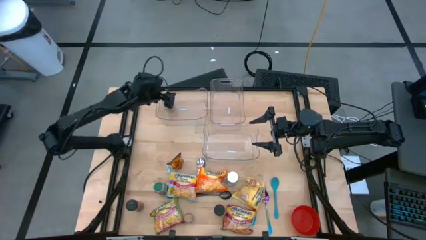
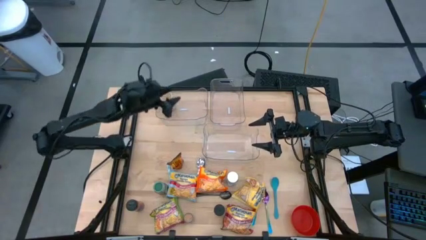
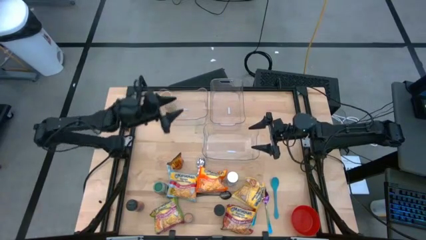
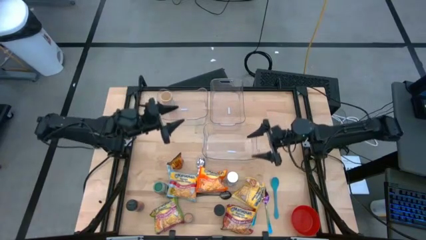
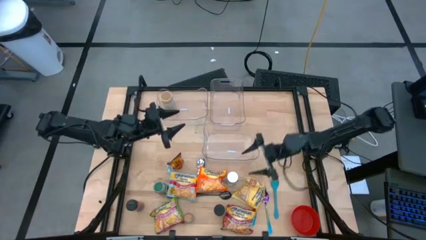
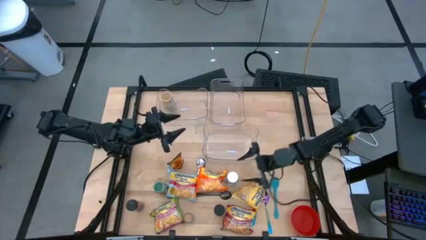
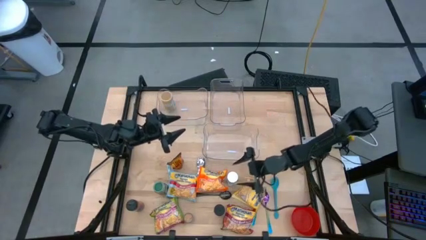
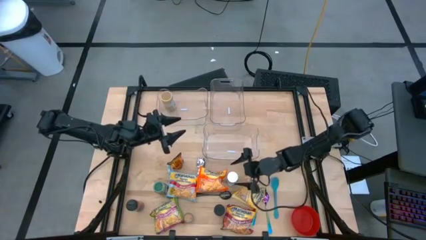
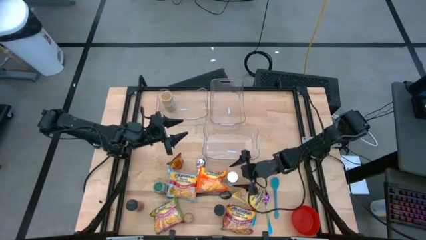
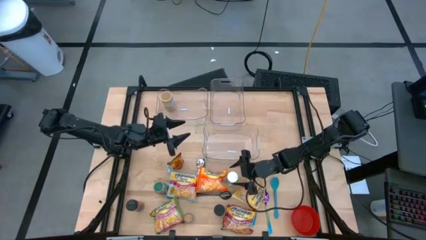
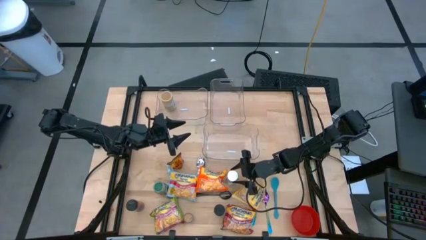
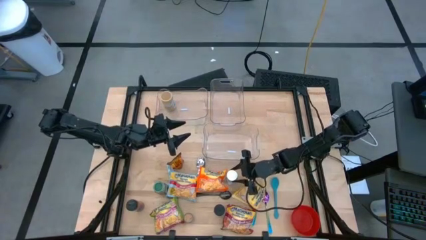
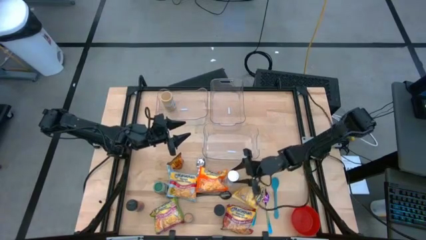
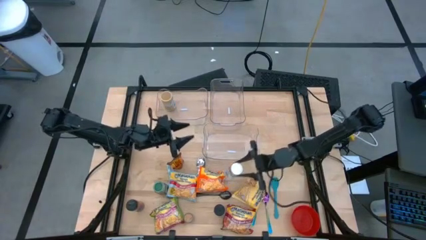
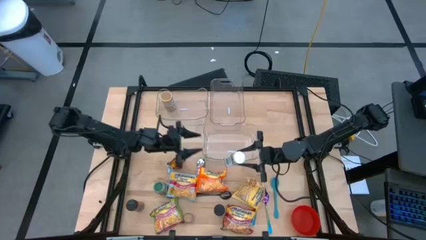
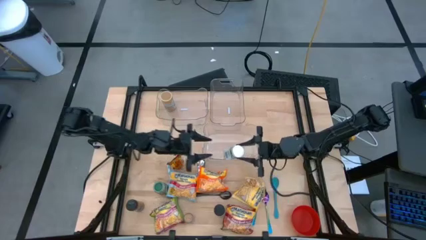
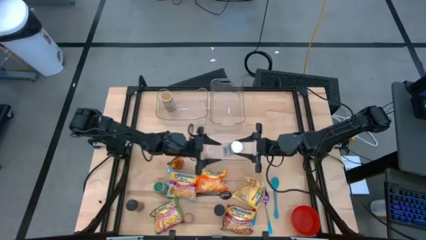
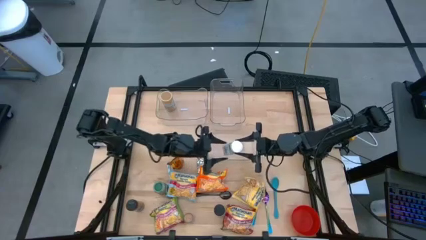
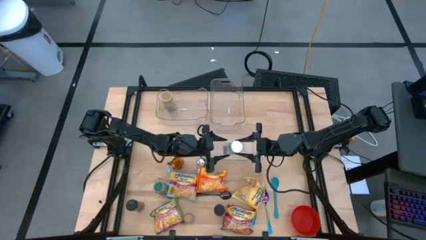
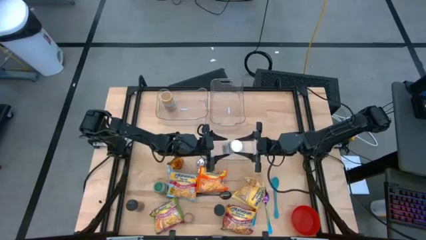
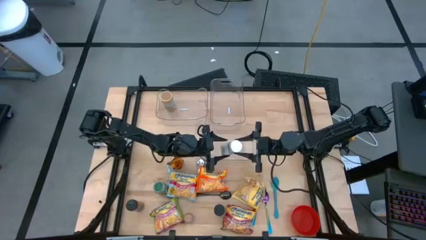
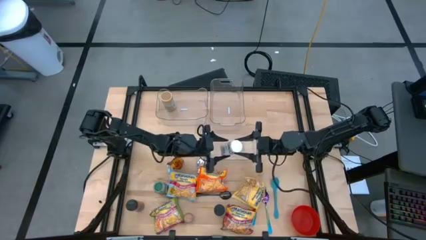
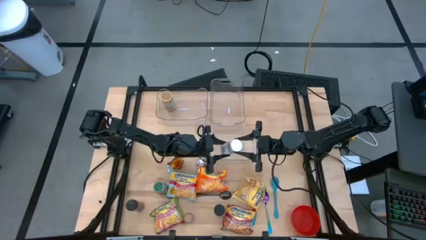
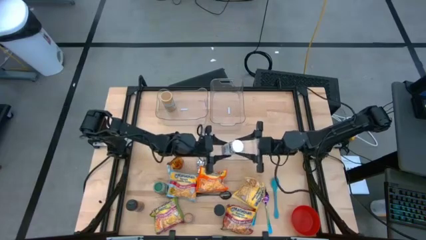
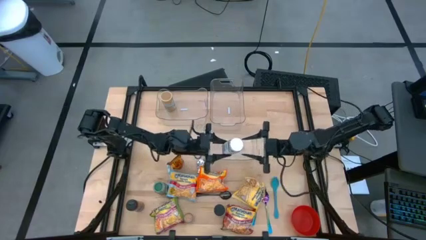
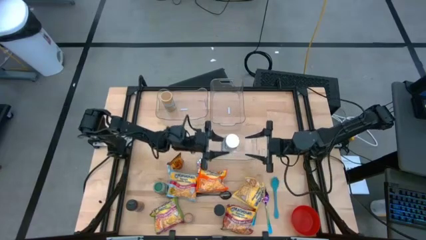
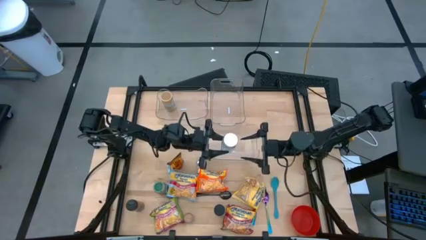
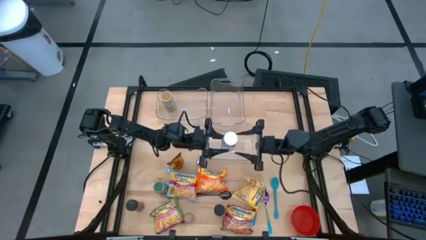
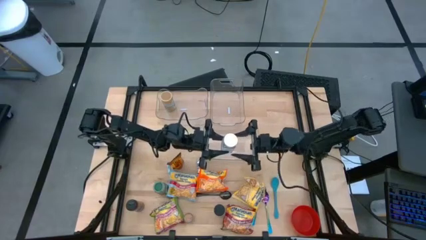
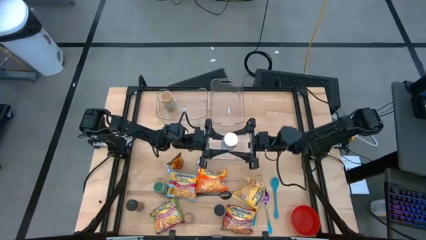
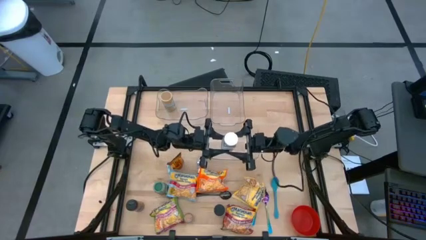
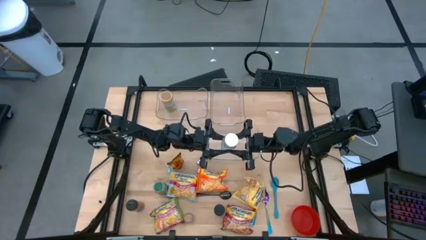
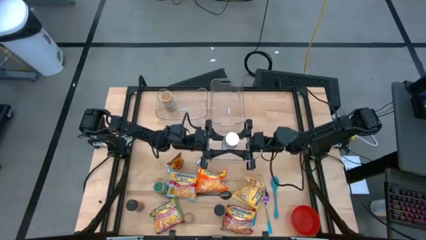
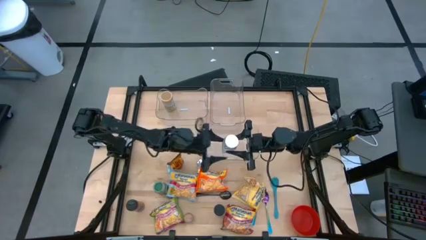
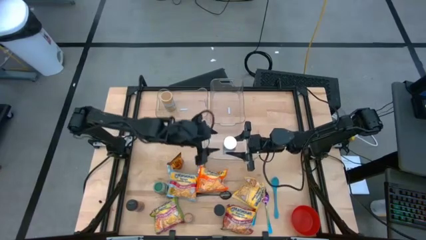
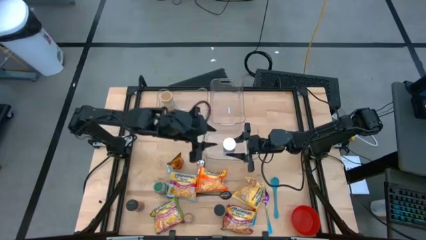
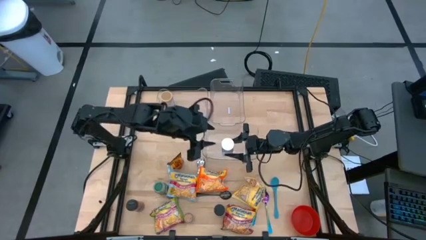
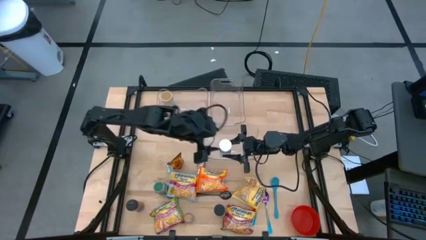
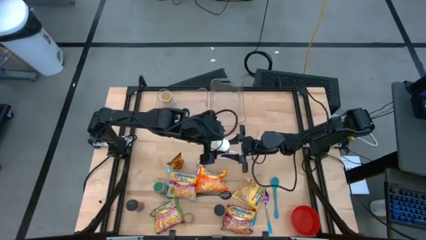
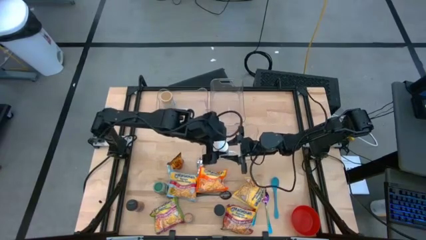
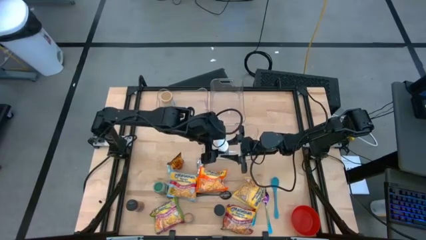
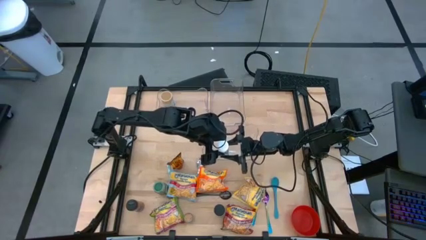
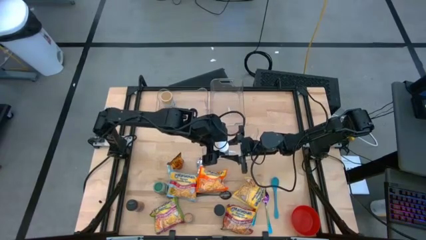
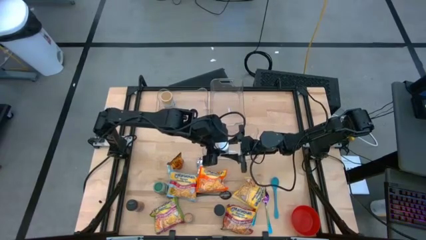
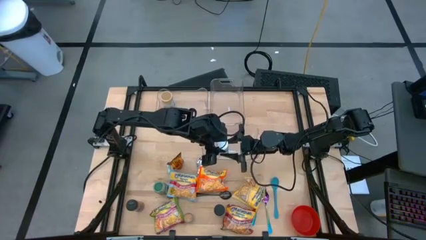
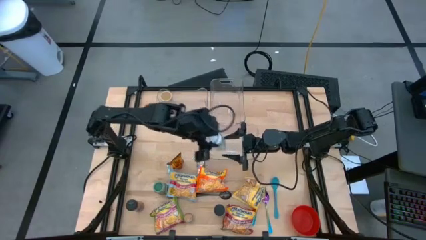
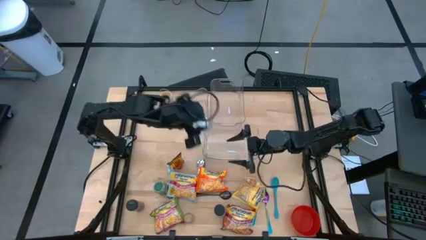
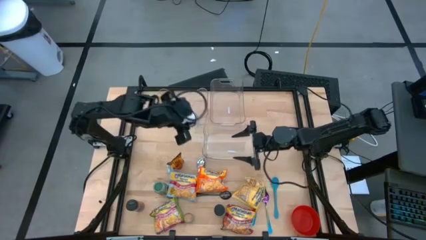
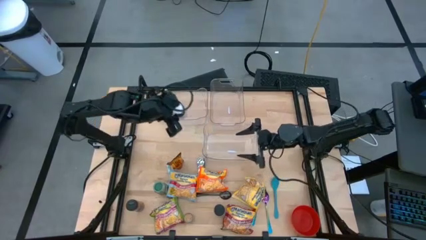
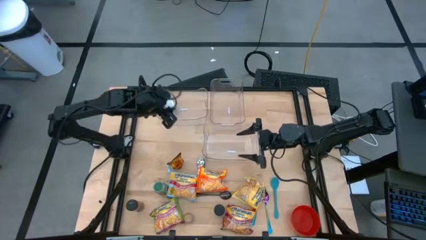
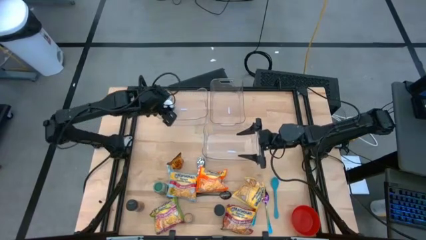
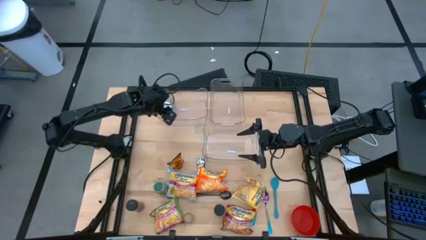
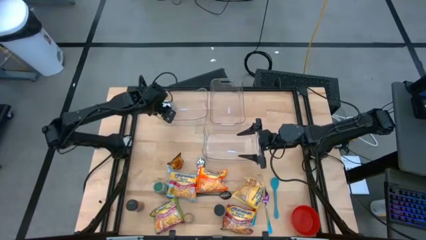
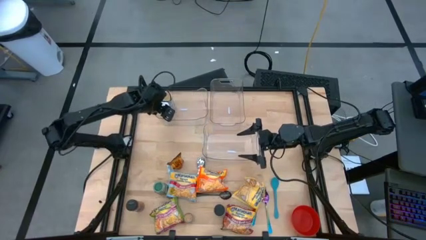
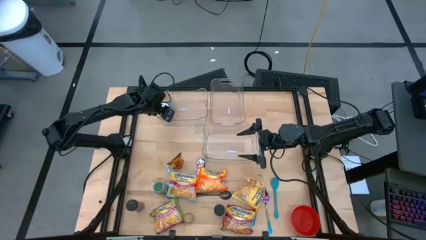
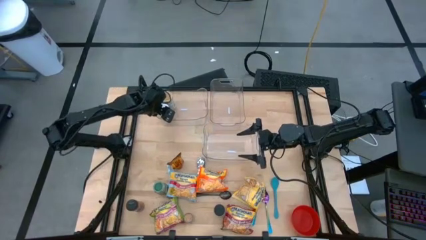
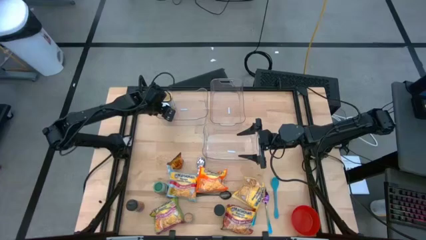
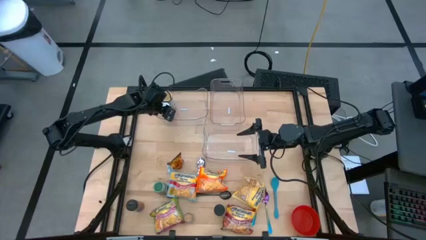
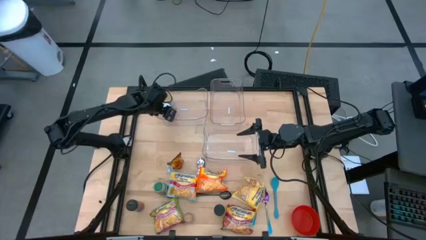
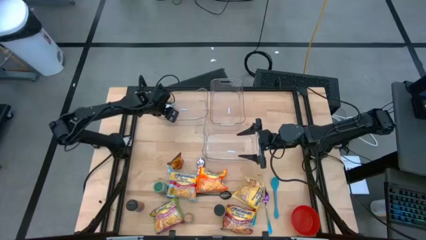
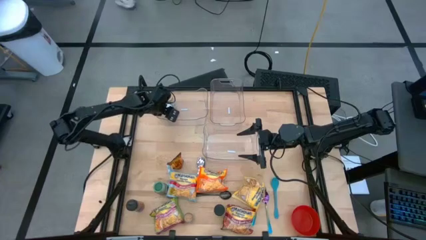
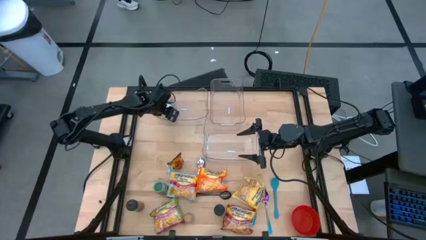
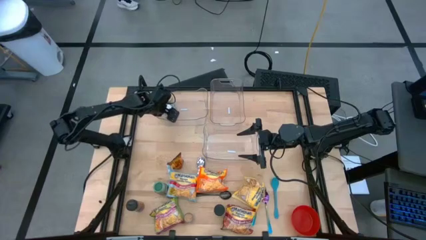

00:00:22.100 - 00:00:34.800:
Task: Pick & Place Food Item
Put the white seasoning bottle into the top left transparent container
